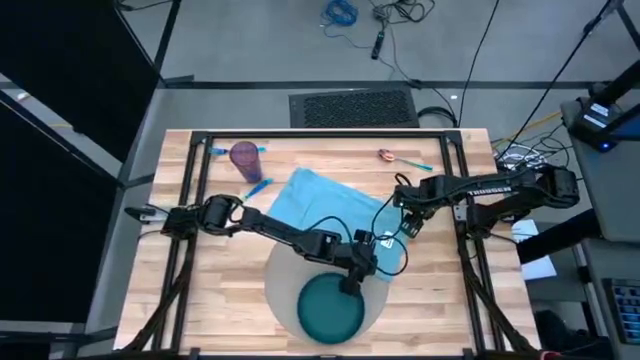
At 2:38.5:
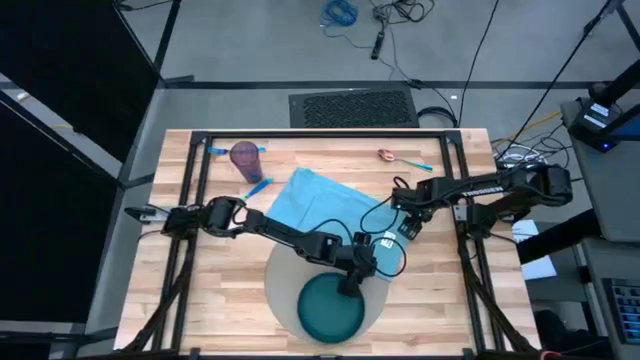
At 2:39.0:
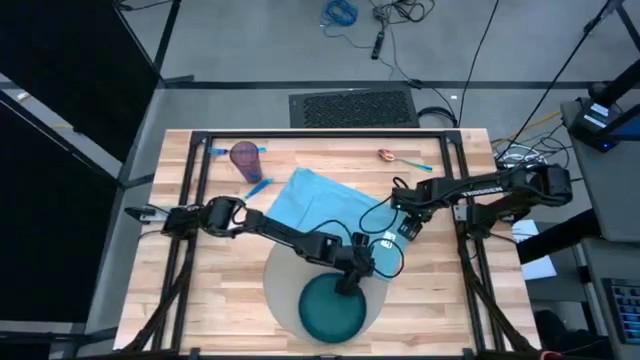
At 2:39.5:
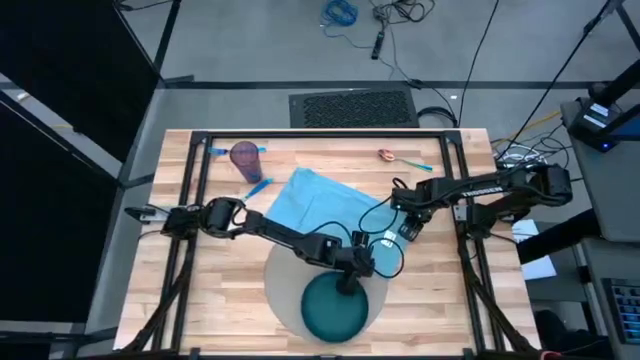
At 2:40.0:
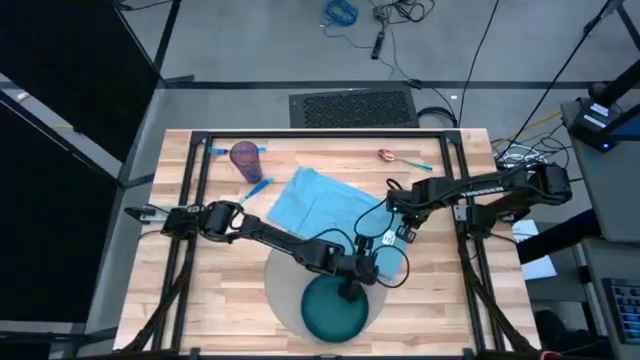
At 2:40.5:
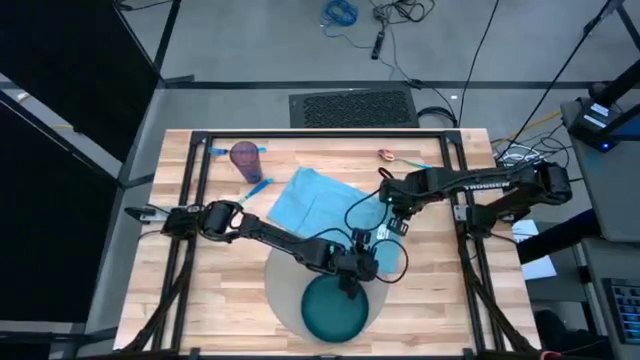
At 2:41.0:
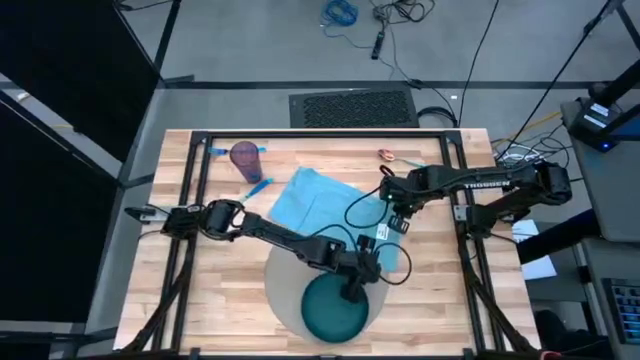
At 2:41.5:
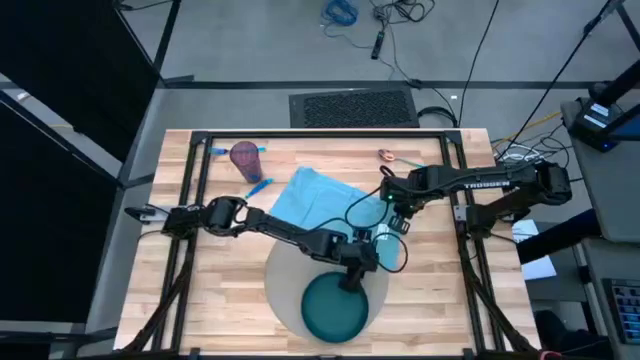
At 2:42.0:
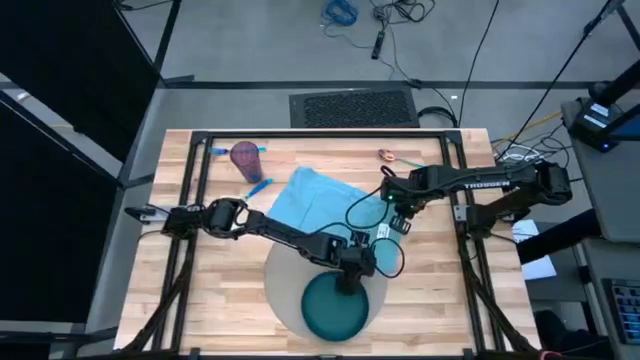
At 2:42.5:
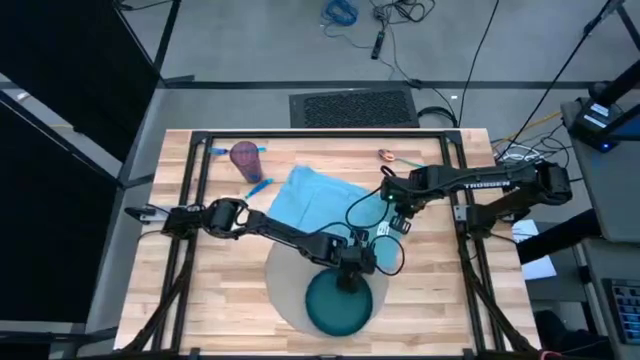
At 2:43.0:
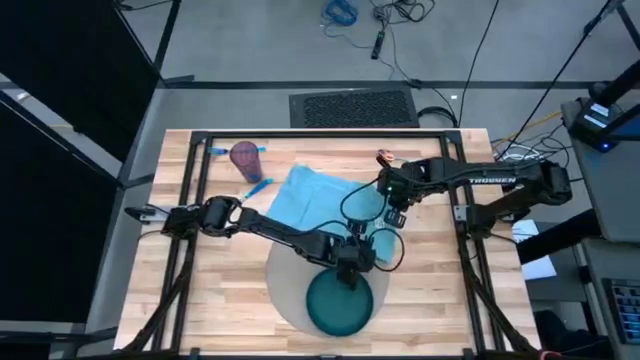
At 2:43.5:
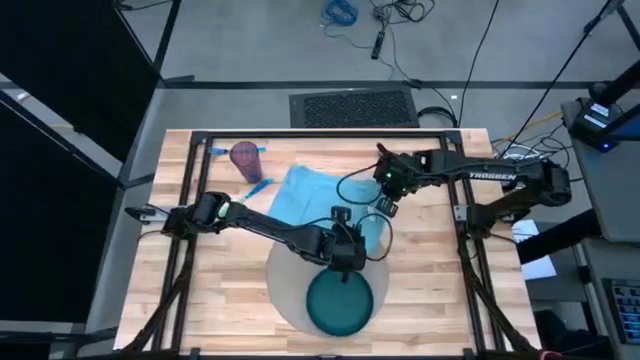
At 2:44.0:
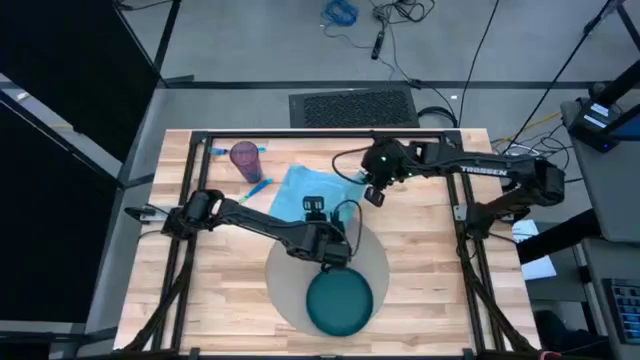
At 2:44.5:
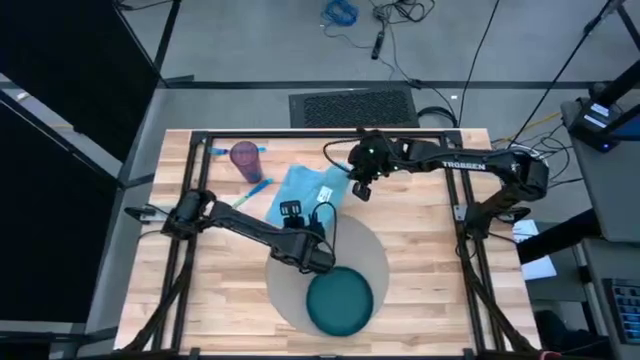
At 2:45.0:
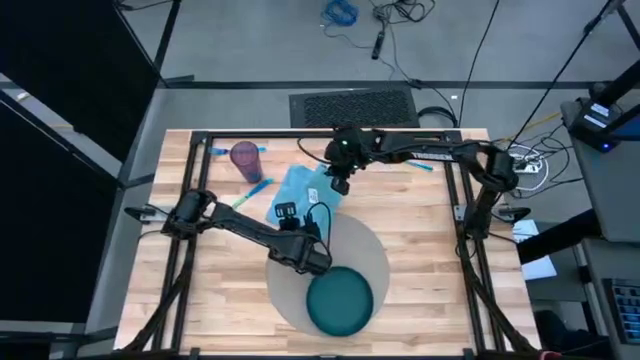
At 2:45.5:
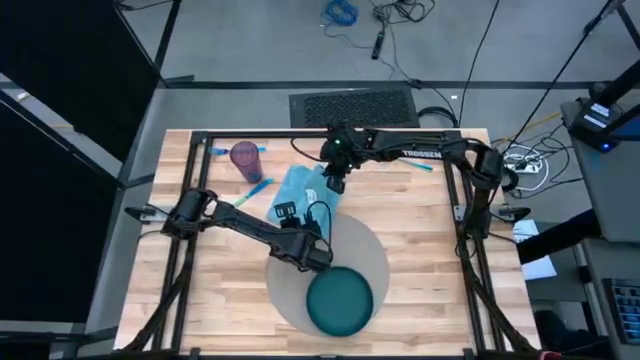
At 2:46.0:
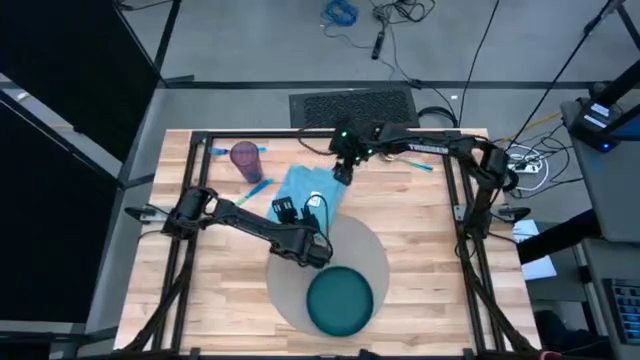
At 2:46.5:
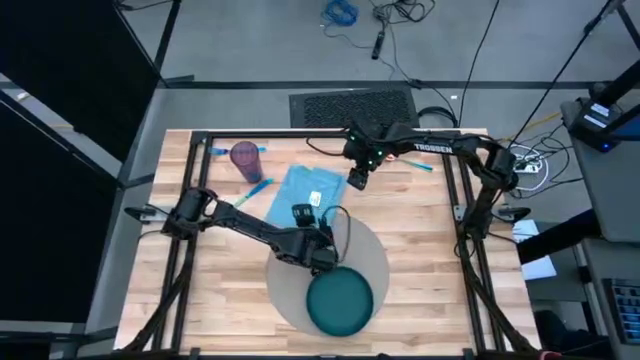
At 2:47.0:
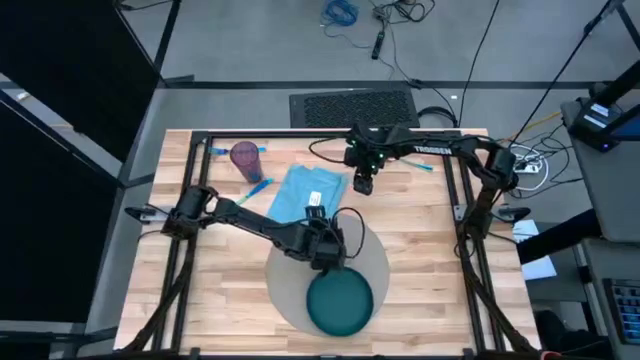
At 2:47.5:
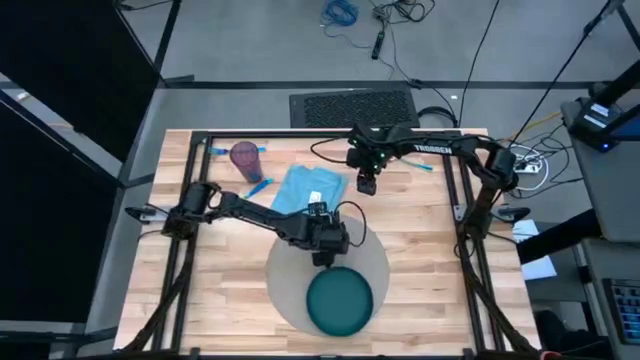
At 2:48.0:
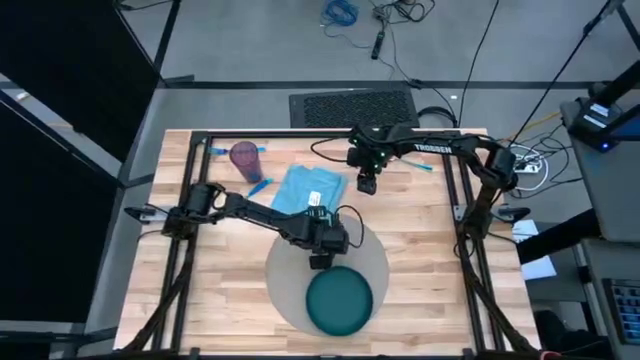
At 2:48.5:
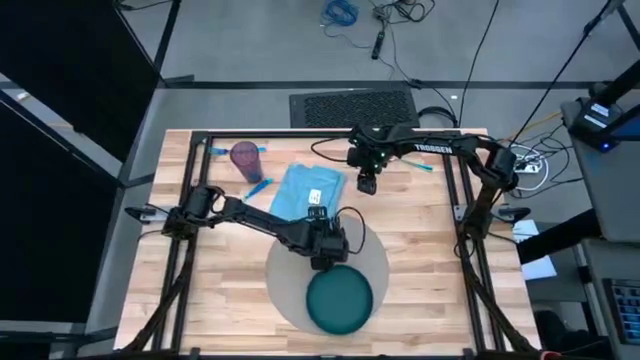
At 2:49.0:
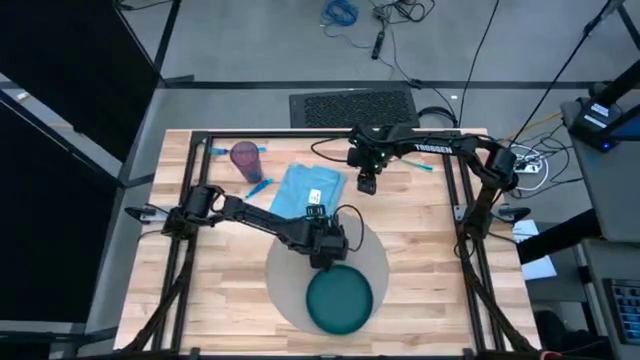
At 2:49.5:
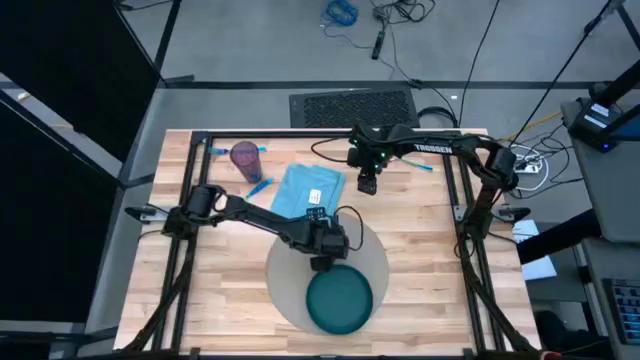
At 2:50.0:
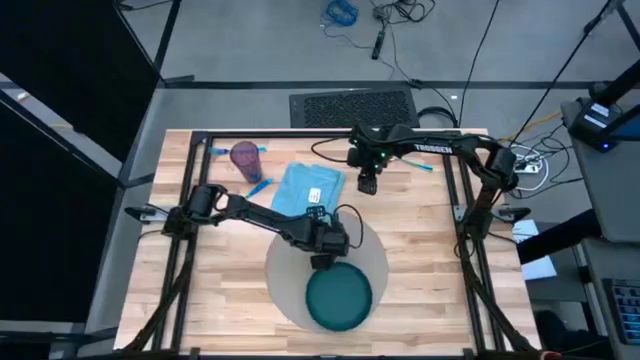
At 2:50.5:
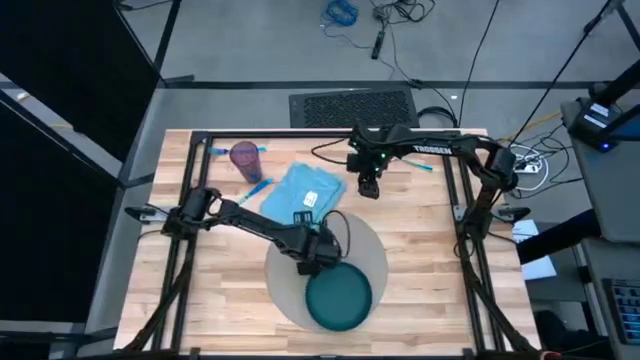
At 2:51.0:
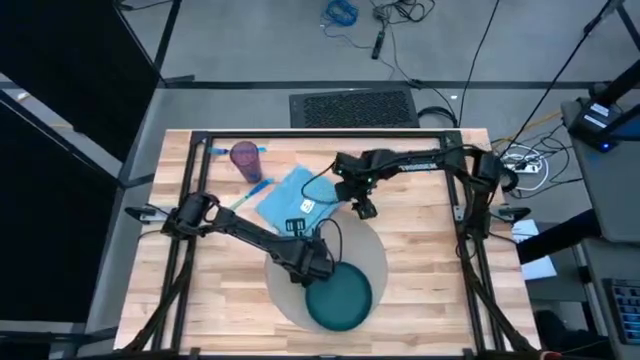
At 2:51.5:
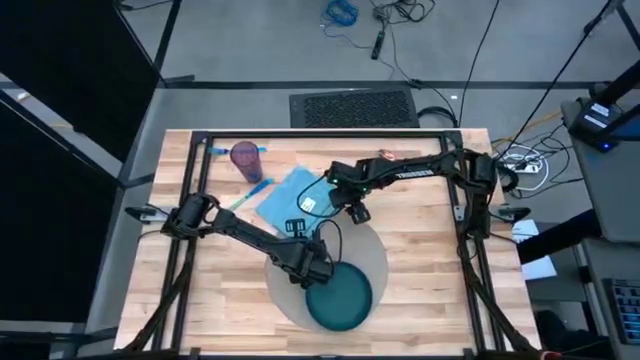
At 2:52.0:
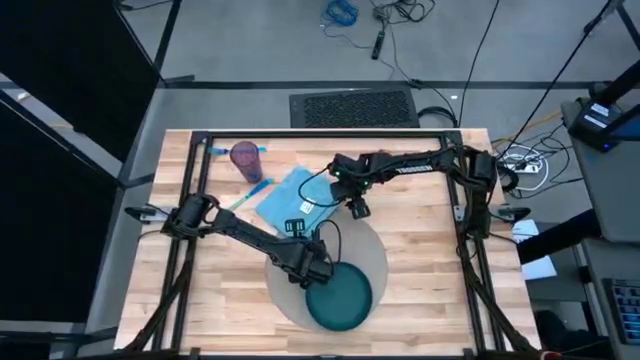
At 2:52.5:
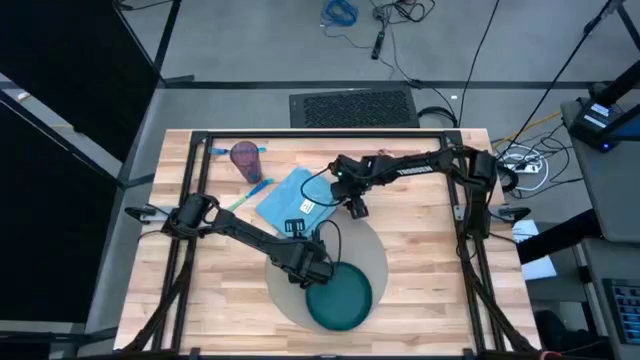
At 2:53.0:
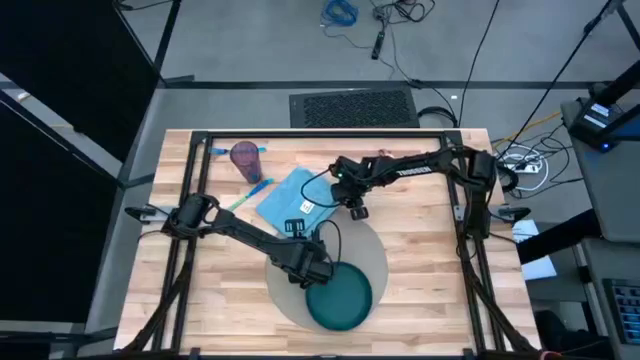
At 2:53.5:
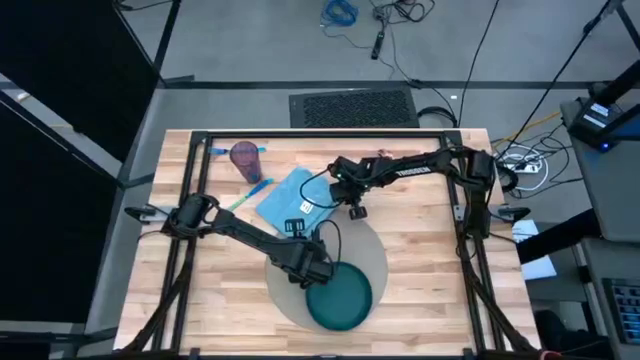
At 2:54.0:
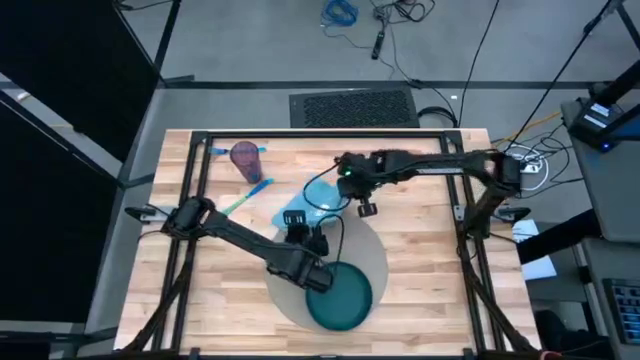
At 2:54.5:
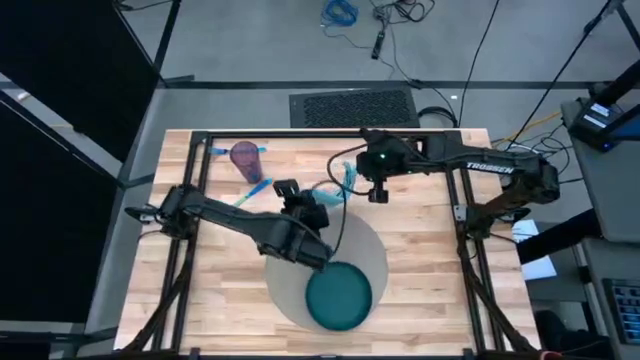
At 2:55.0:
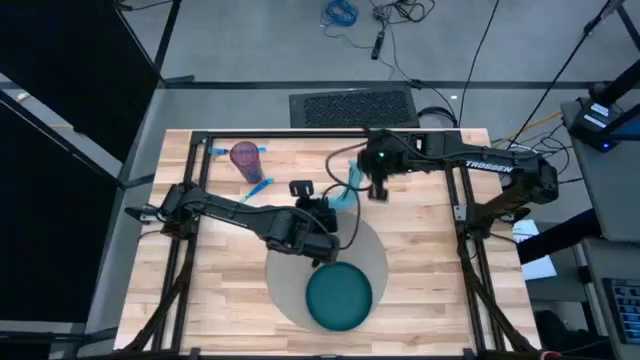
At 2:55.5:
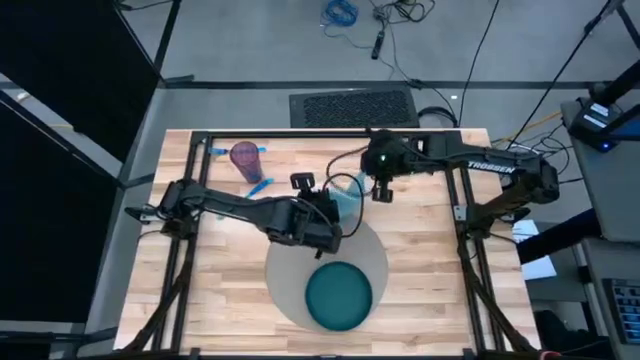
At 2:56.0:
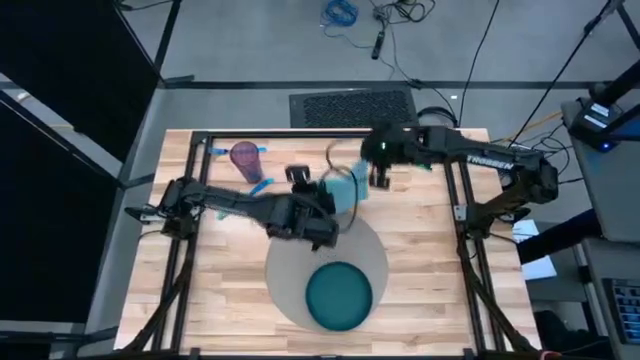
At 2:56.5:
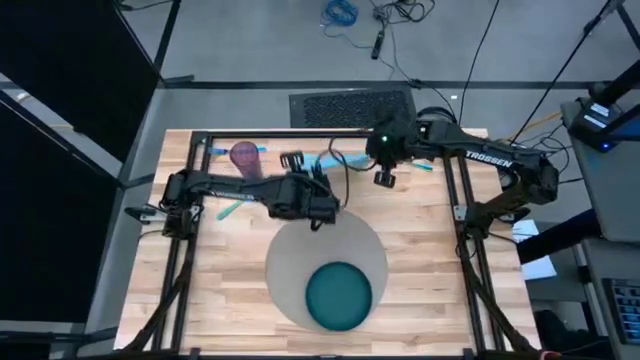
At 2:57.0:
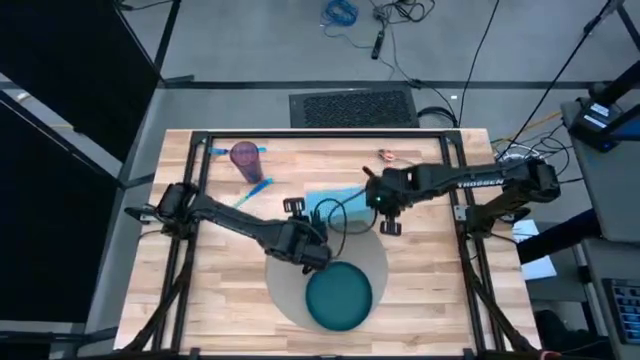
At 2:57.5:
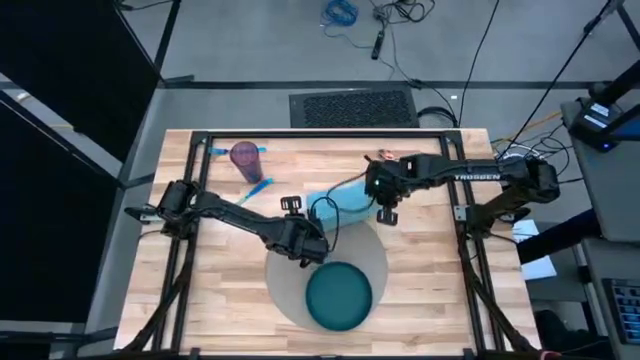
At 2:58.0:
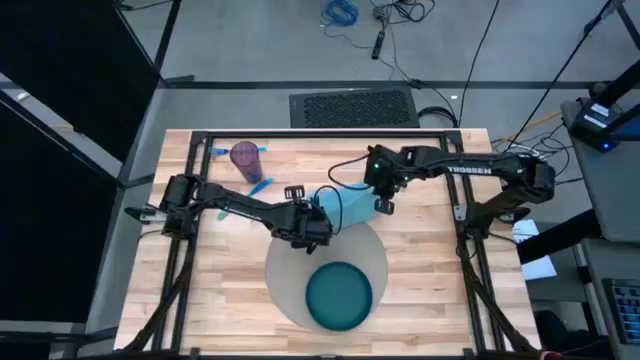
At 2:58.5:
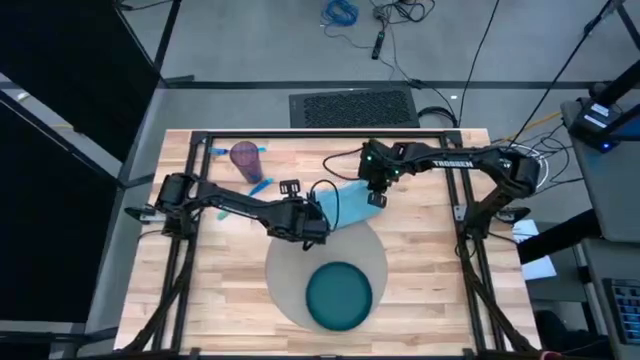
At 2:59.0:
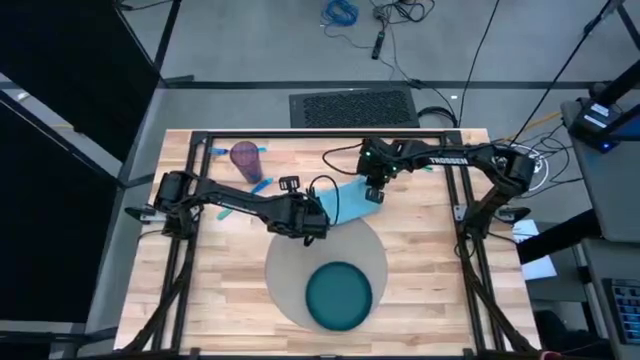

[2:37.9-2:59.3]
Task: Set table place
Fold the blue napkin
